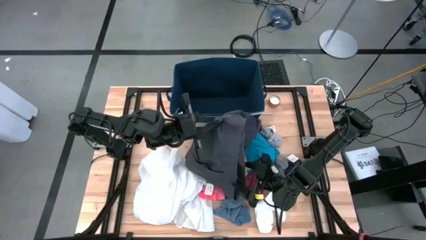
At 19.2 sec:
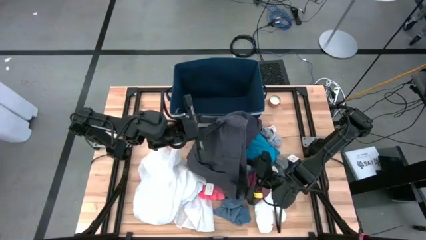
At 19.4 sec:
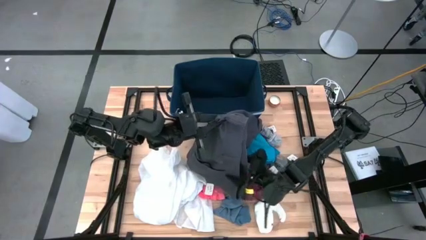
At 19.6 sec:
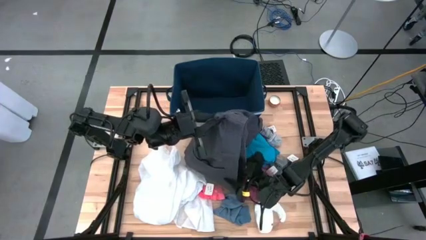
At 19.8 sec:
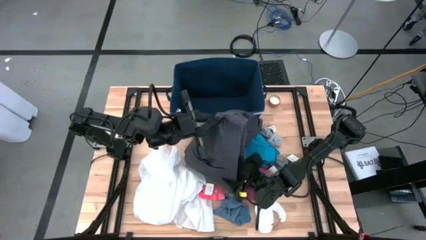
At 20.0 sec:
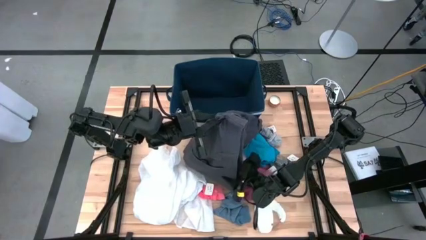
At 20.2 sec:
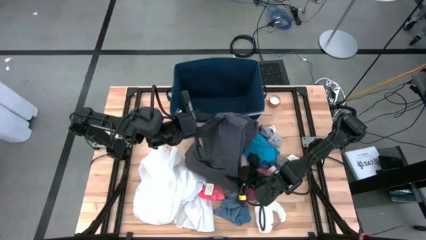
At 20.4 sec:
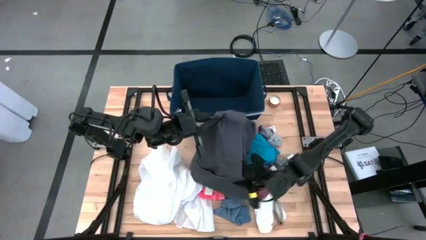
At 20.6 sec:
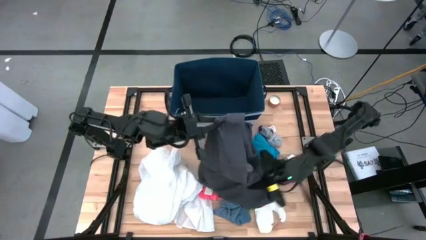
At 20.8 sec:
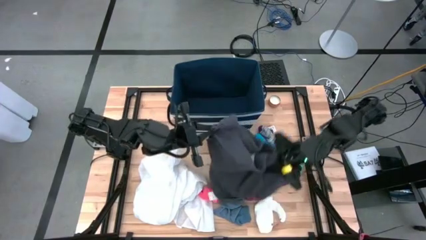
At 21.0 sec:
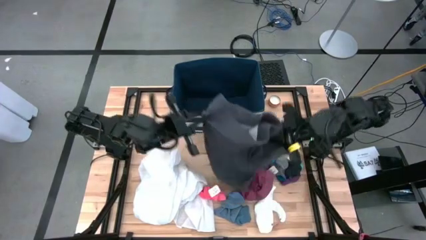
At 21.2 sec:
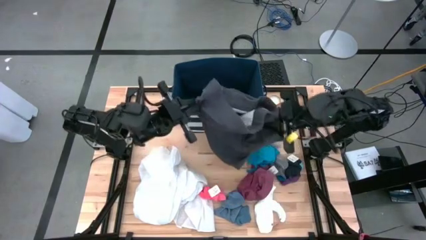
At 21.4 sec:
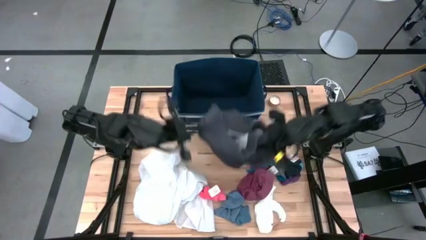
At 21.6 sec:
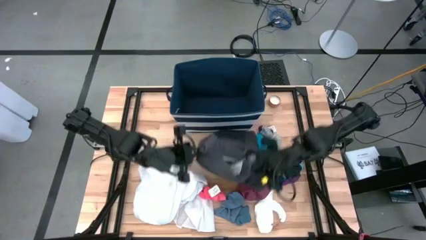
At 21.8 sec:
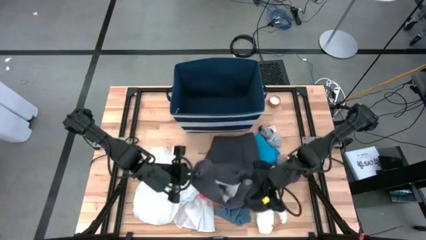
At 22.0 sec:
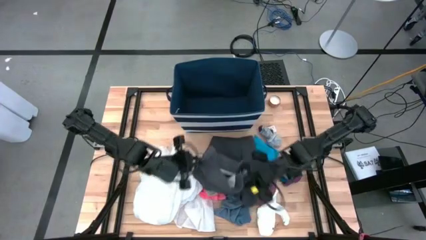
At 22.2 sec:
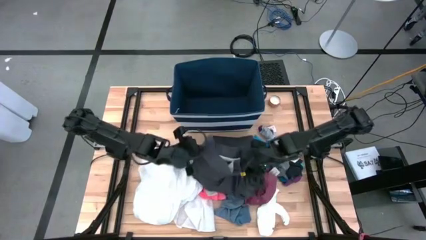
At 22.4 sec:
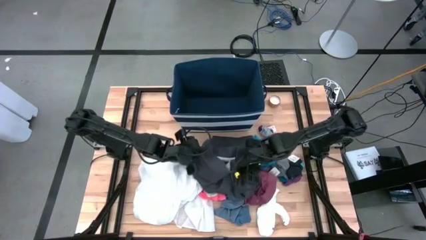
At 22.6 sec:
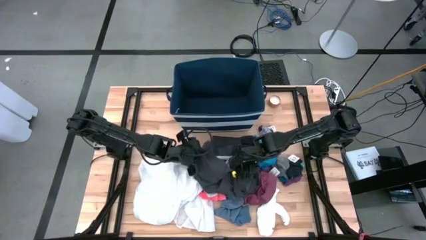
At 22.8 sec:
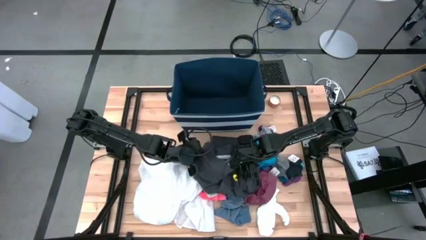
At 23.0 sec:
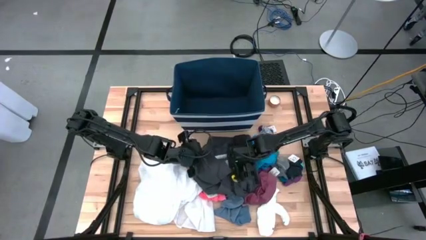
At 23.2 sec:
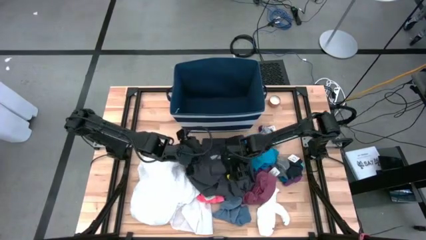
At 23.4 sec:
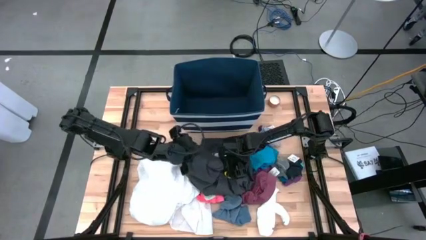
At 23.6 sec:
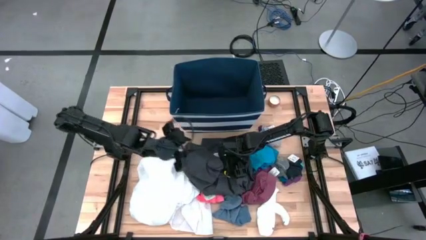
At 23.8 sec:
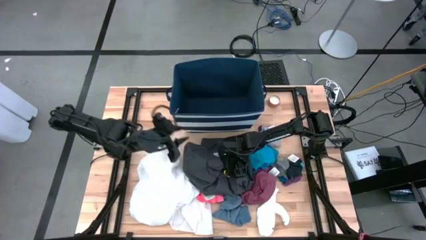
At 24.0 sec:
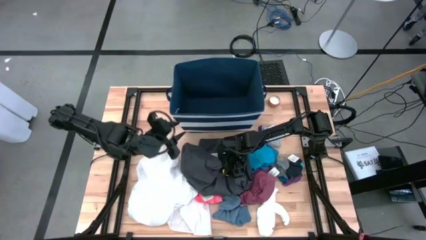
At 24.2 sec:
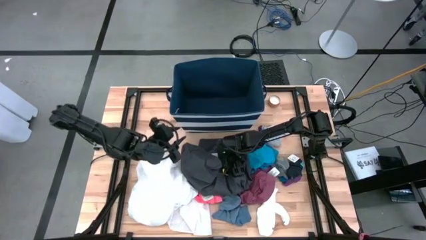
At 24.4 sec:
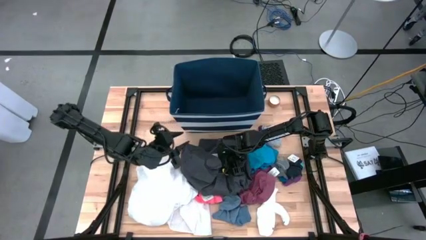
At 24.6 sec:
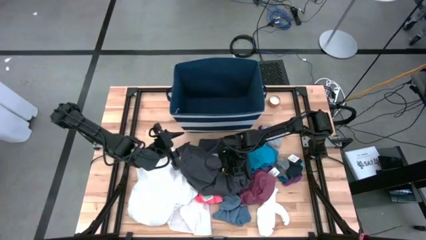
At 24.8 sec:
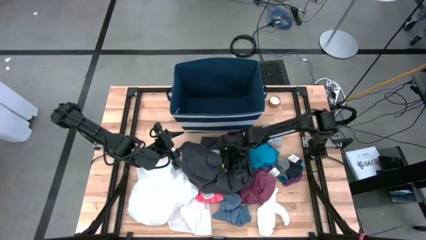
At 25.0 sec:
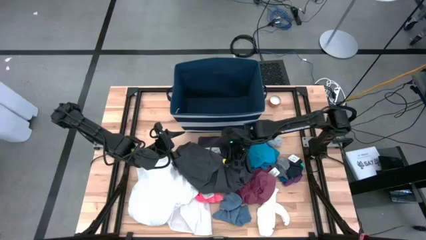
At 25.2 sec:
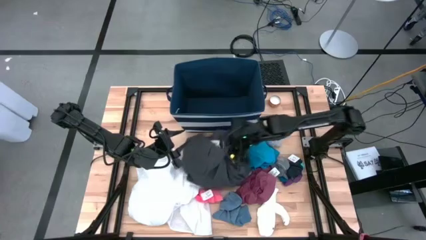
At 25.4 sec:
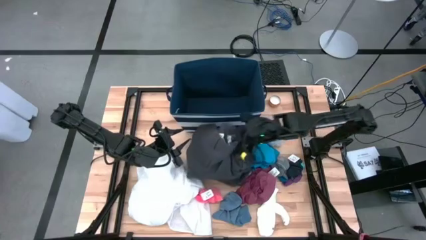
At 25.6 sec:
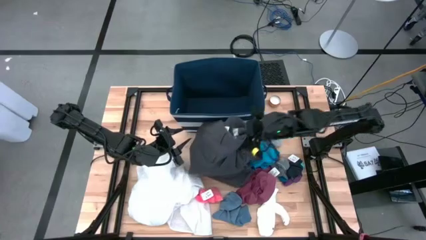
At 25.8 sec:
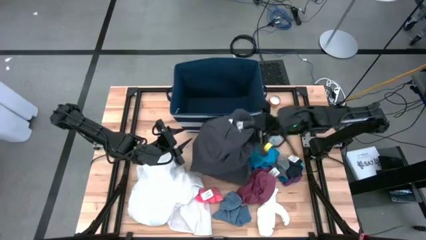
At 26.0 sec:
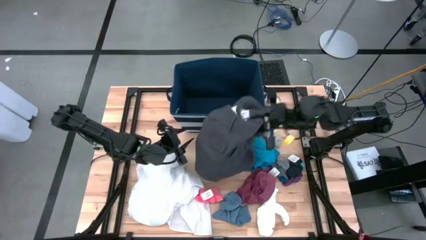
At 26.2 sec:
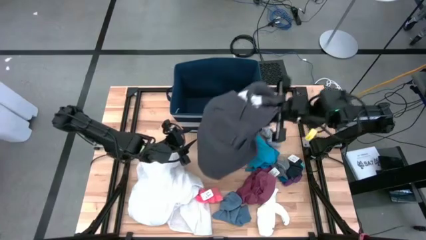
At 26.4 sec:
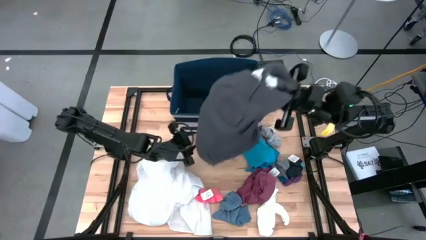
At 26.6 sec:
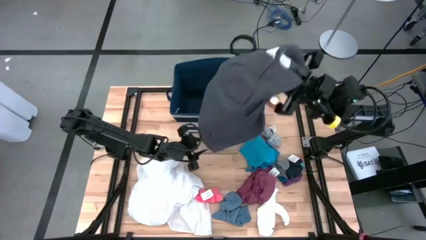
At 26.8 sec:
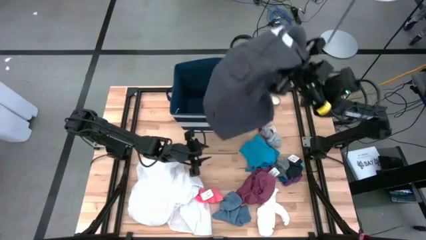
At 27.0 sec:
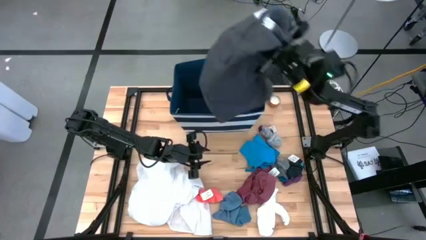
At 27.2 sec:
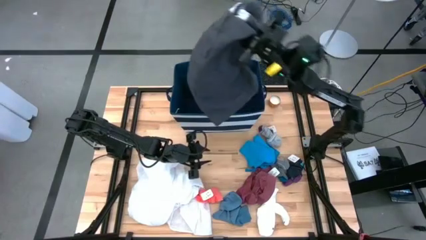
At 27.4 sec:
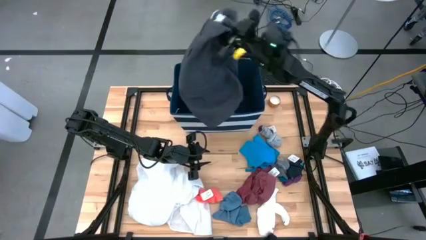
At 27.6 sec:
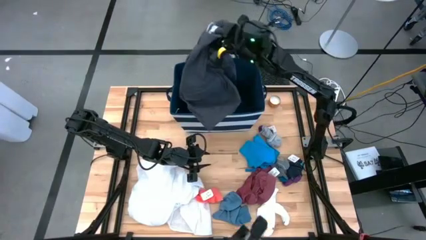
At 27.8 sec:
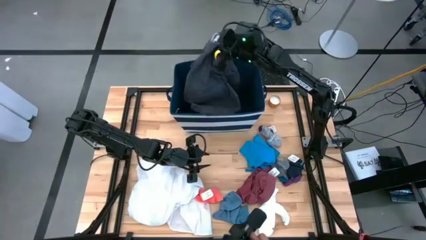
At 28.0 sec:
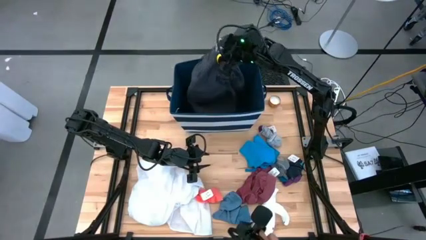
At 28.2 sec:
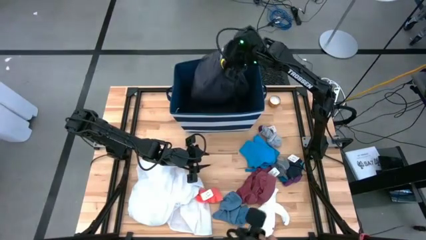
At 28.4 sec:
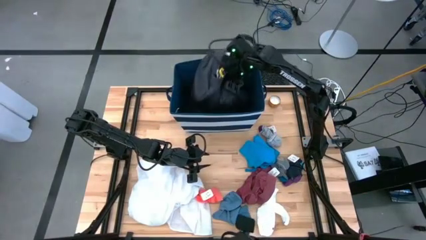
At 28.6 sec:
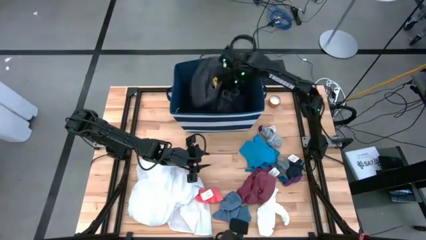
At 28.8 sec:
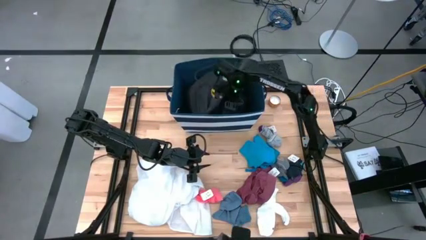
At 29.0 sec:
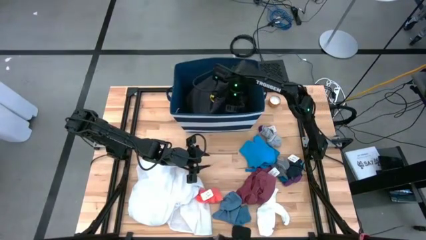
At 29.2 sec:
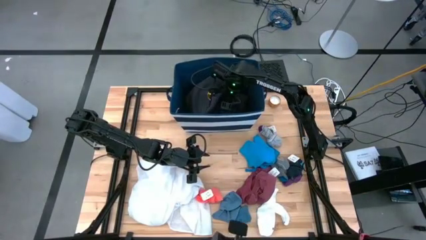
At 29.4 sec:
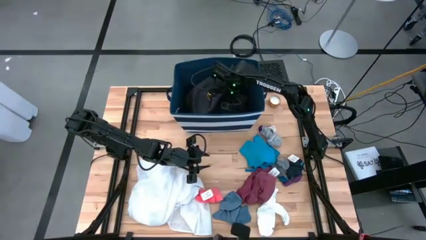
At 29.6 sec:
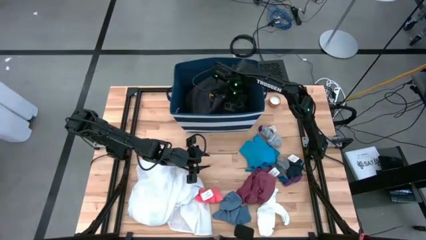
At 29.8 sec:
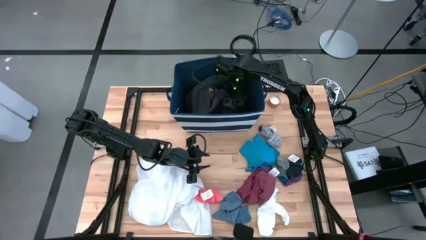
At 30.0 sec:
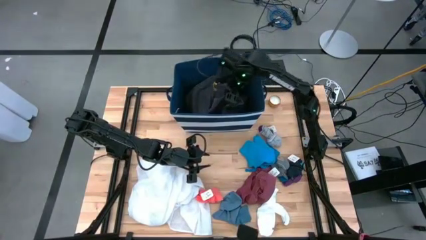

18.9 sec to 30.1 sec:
Task: Sort clothes
Put the gray shorts into the blue laundry organizer
